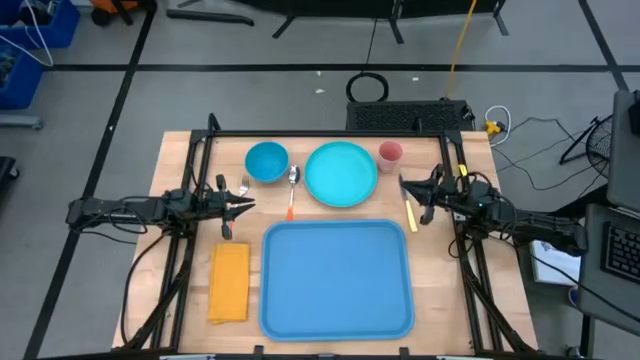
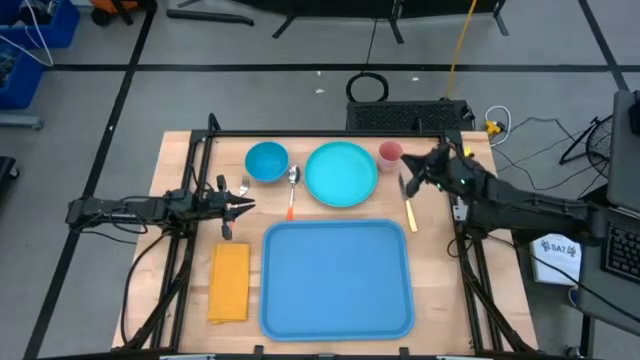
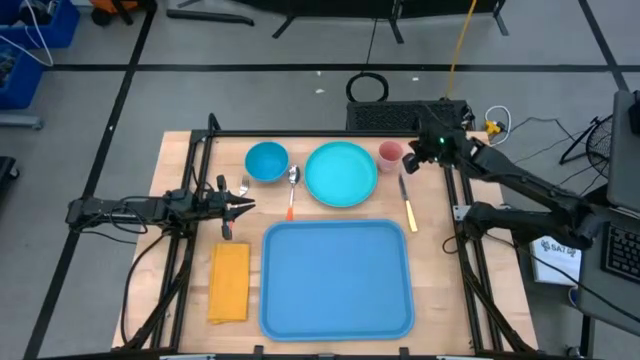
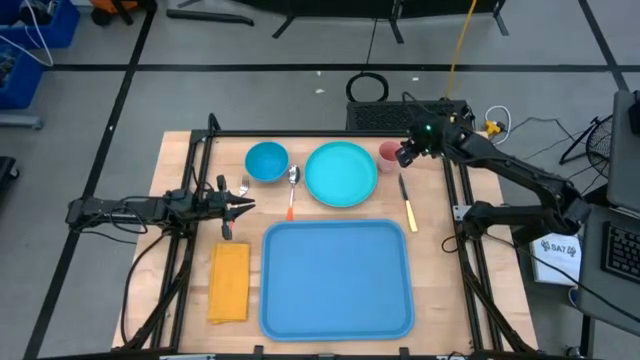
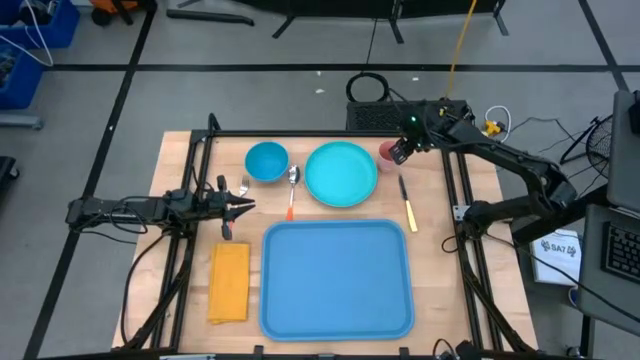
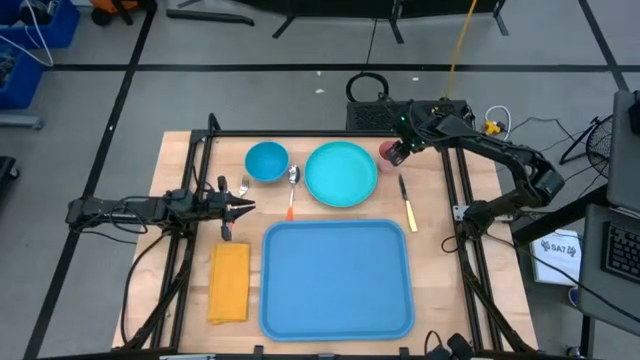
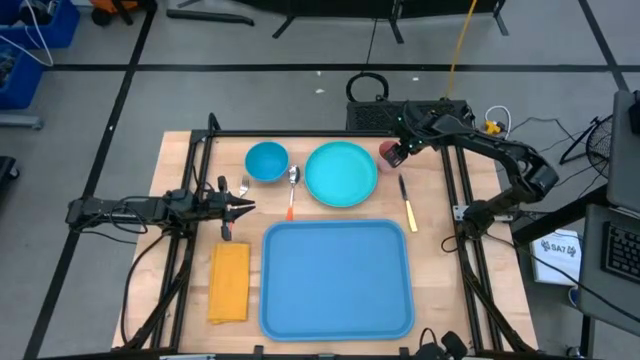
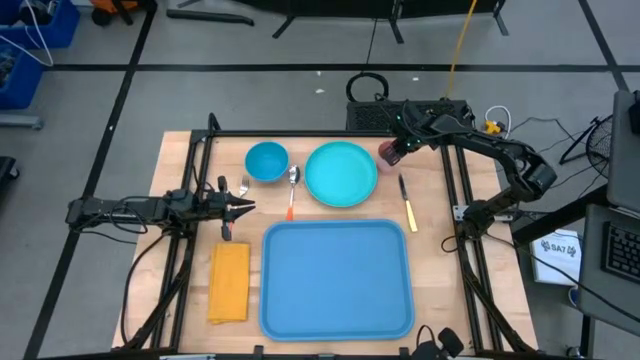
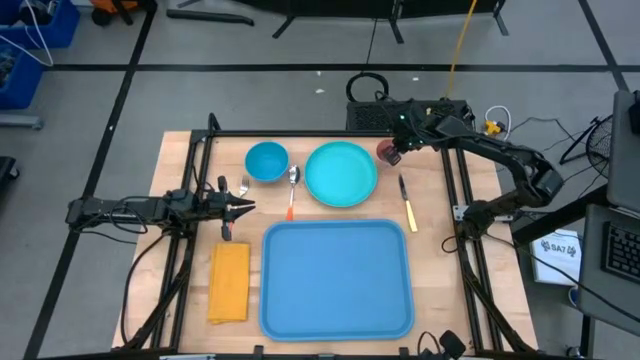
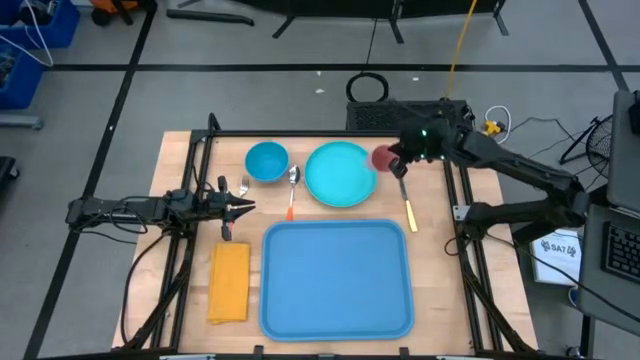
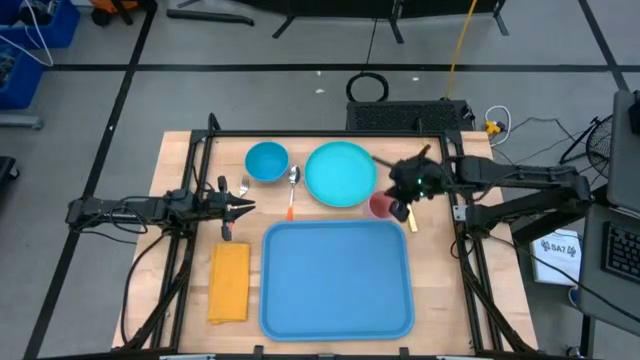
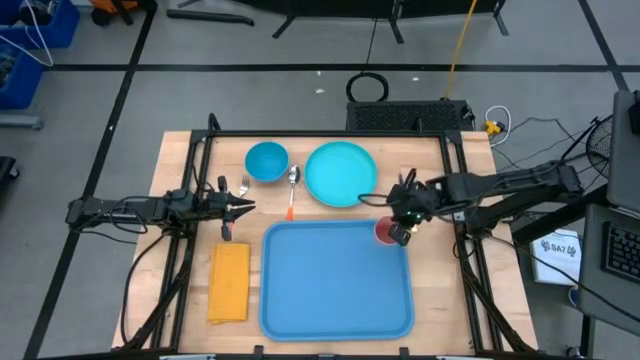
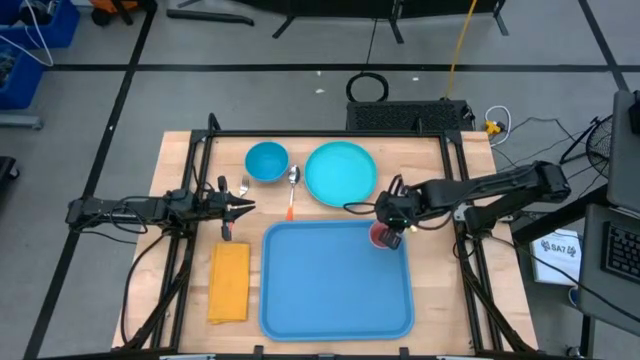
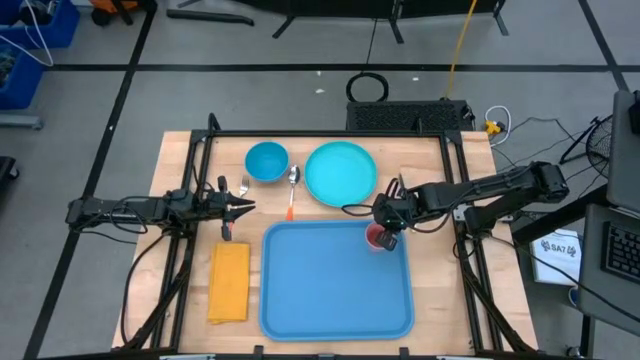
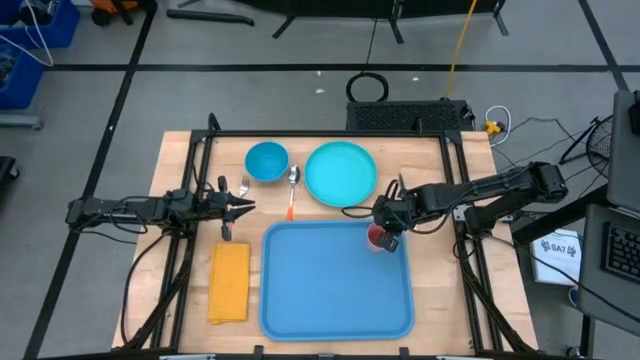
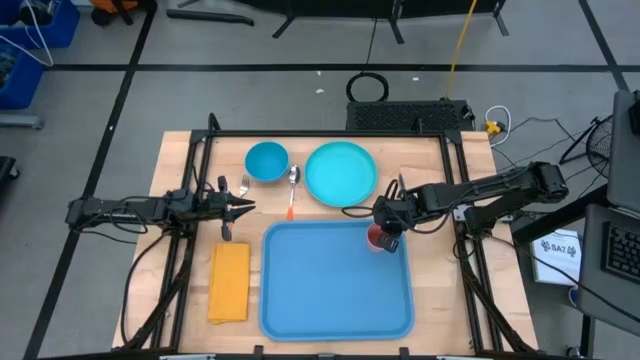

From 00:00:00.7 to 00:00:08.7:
Task: Set up tray
Put the pink cup on the blue tray

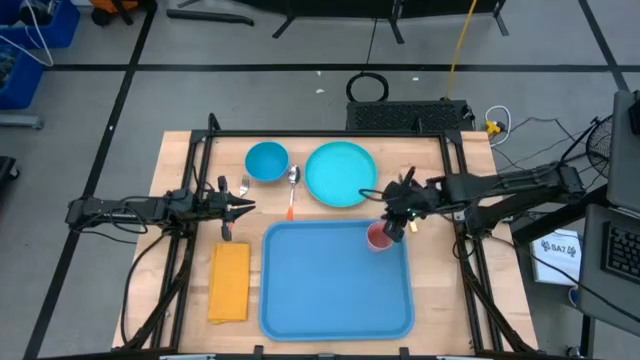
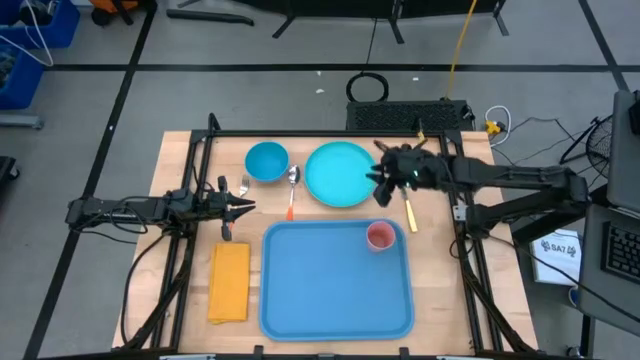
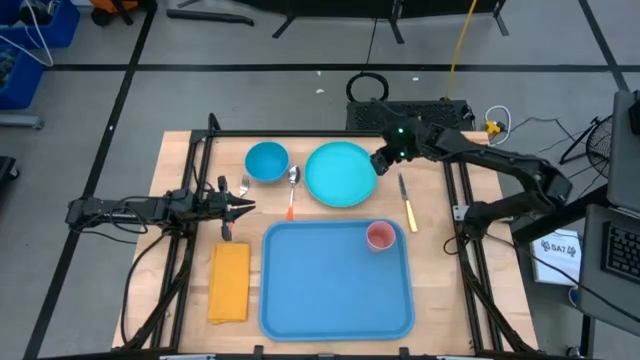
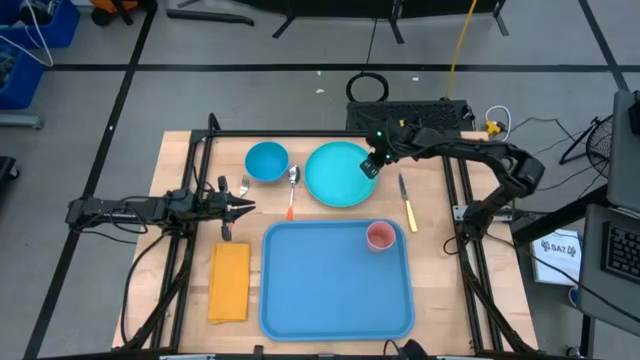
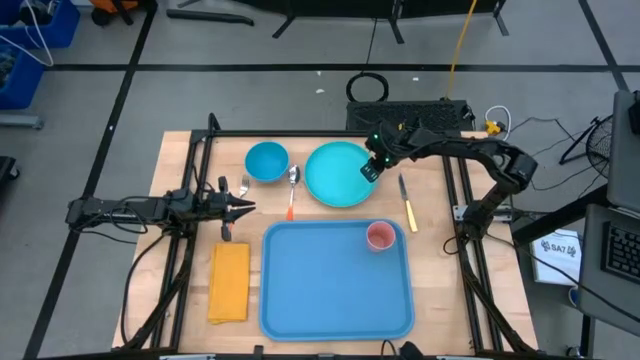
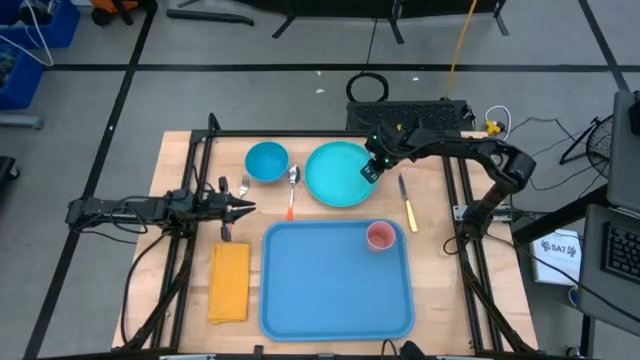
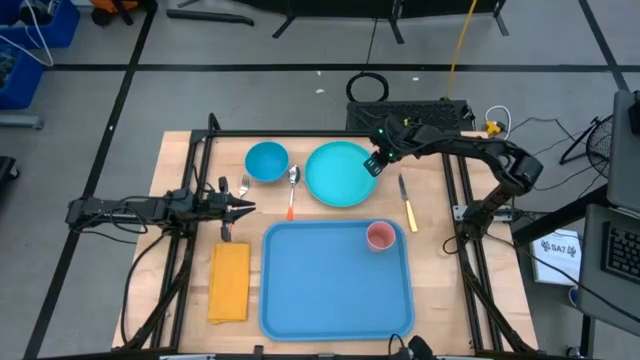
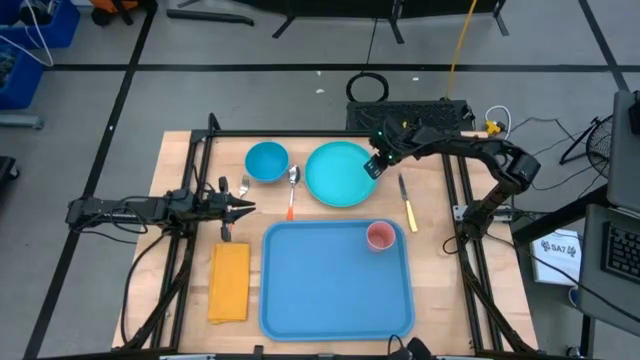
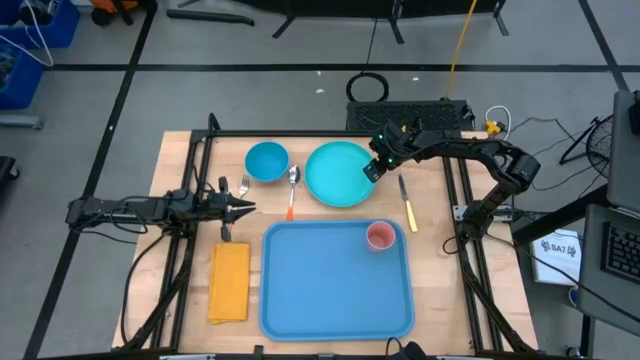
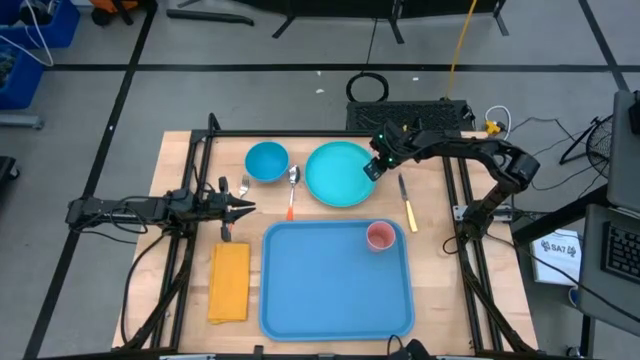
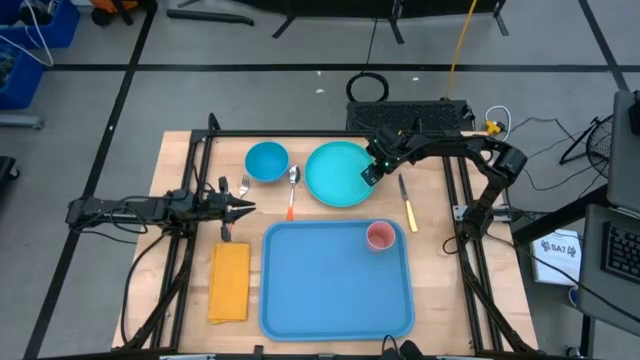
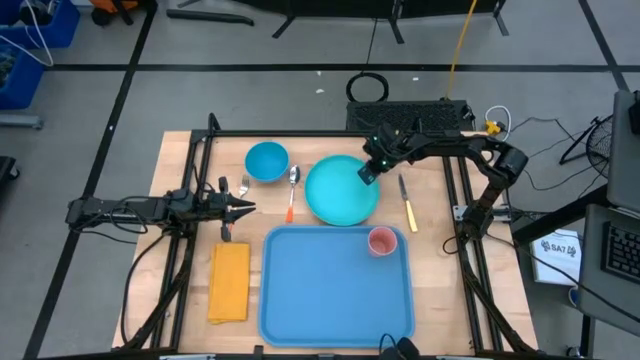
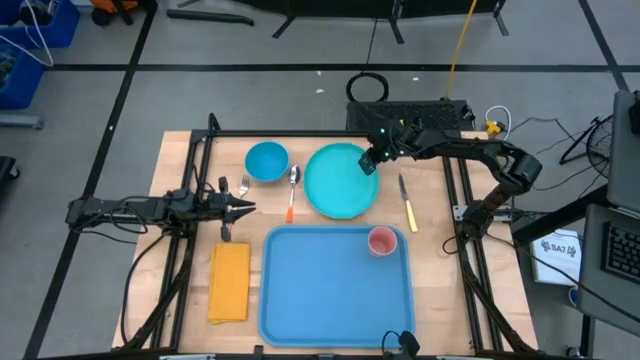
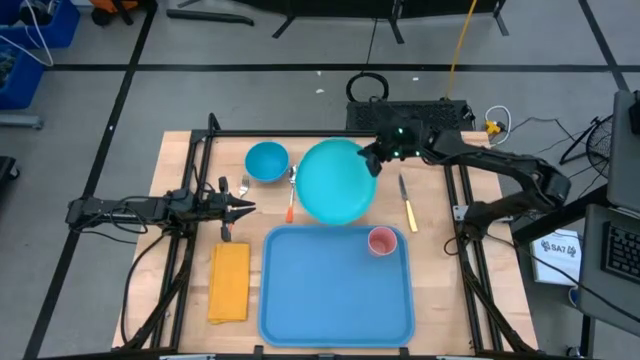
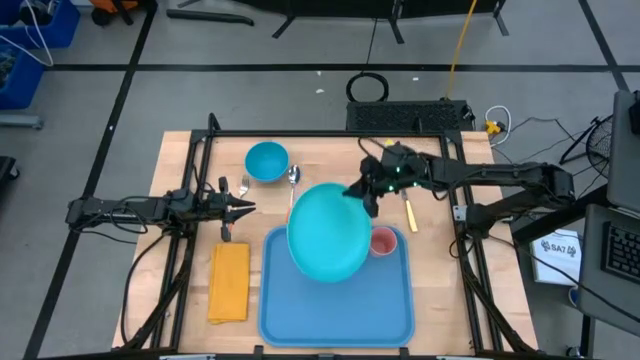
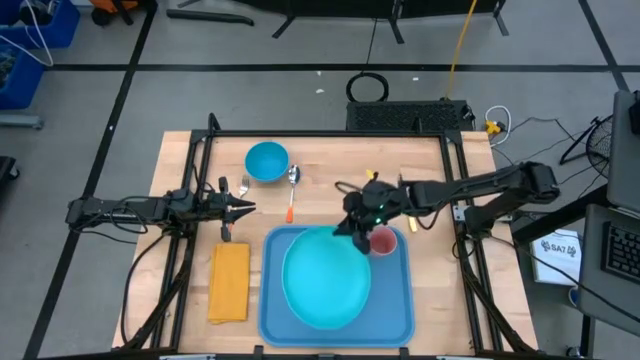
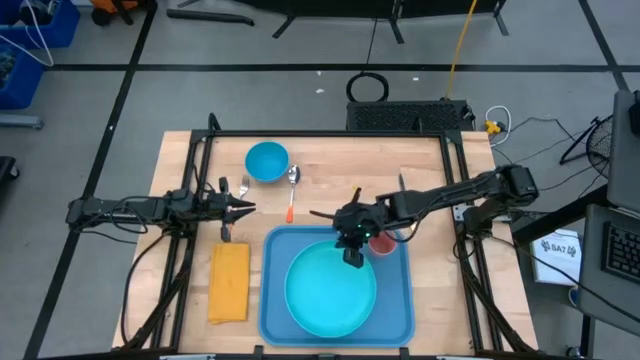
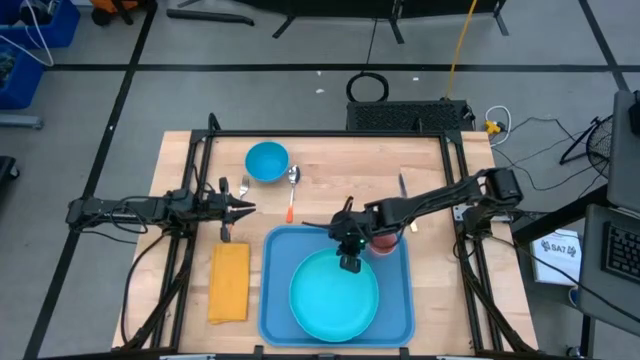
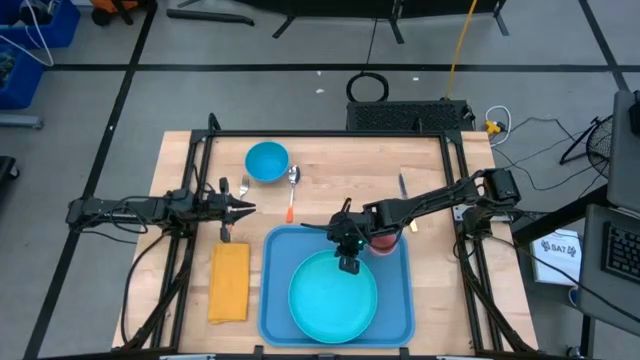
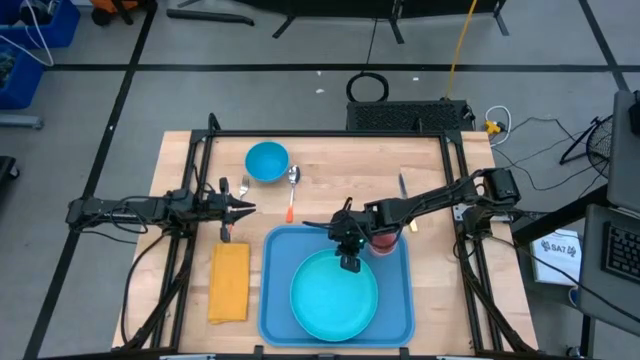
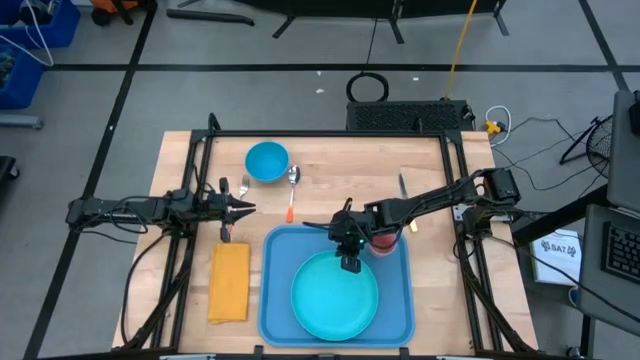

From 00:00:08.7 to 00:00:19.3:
Put the blue plate on the blue tray to the bottom left of the pink cup

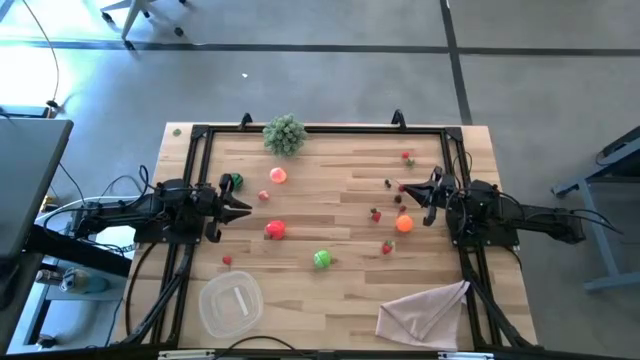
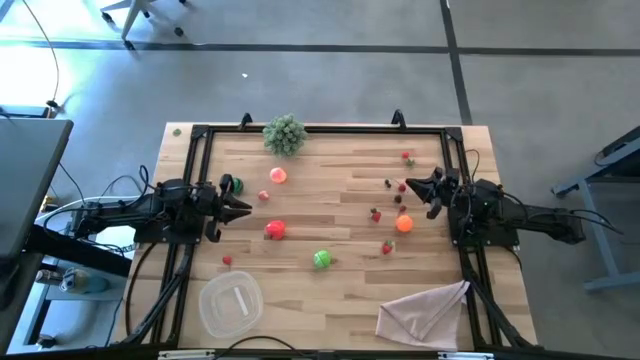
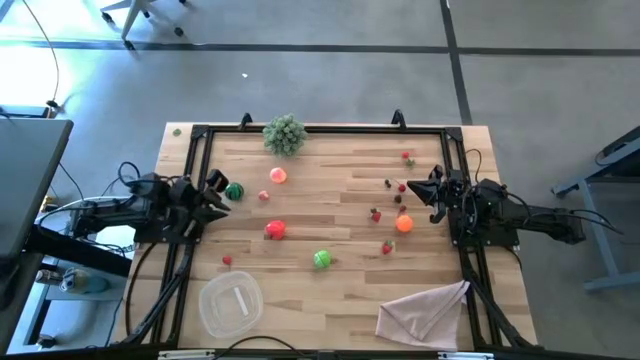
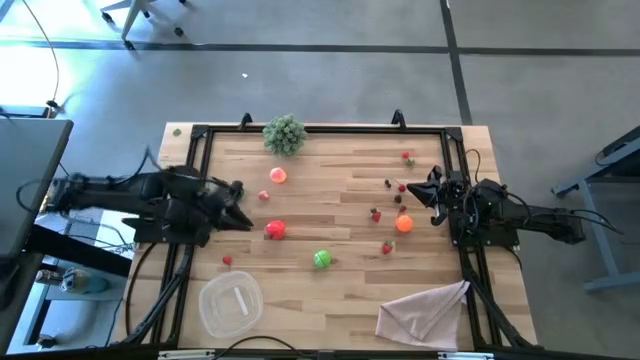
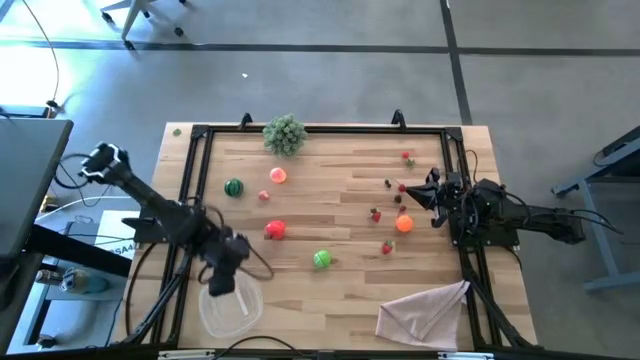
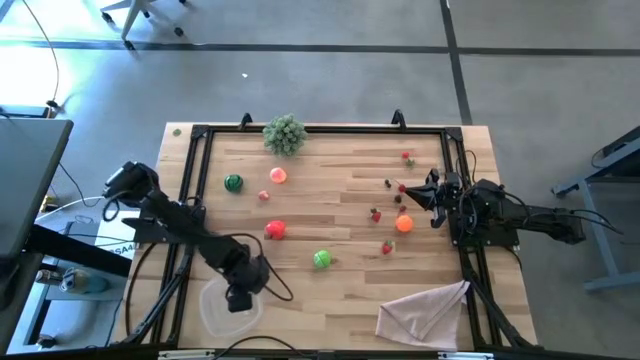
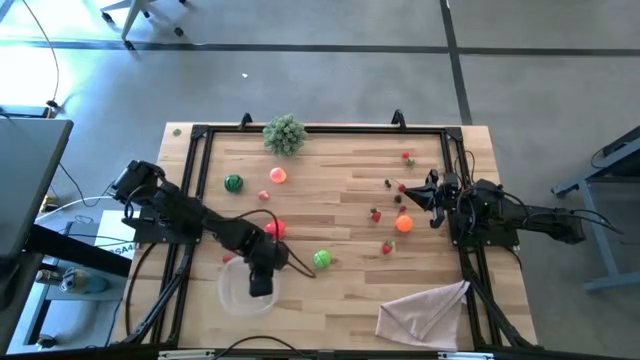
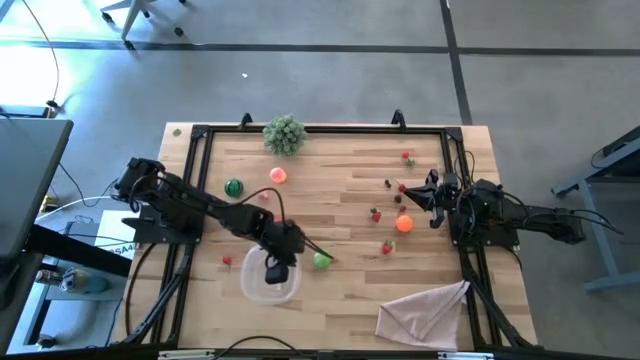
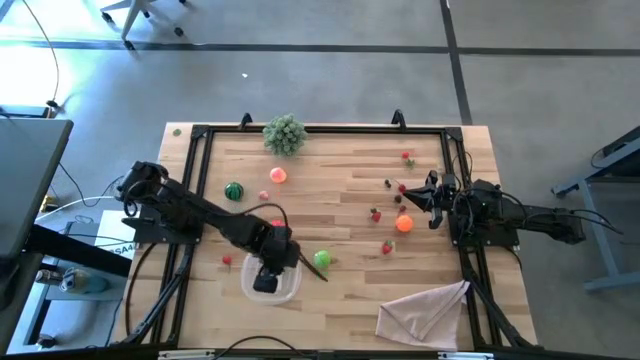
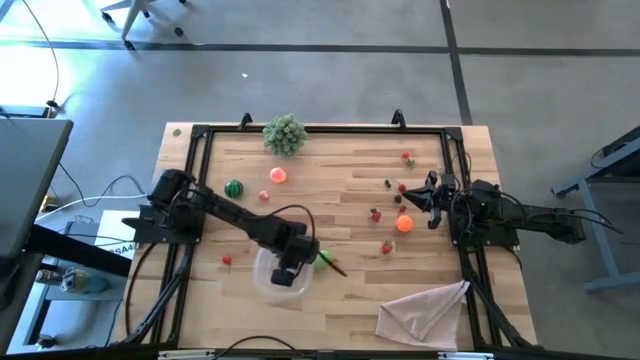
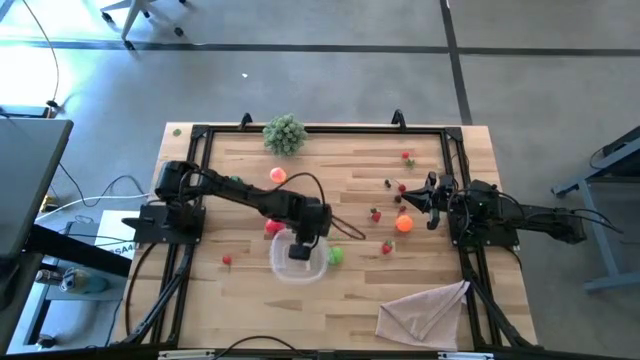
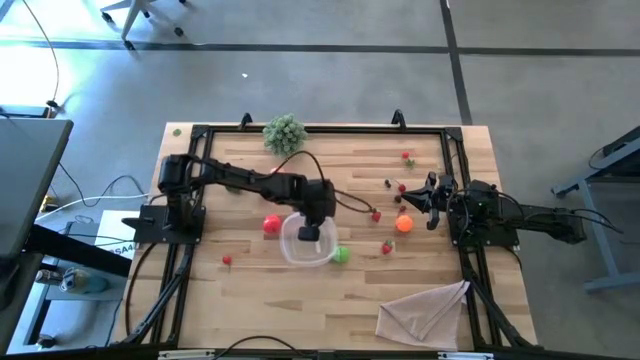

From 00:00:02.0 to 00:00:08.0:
Task: Pick and placing Produce into tupperware
Move the transparent bin to the center of the table
